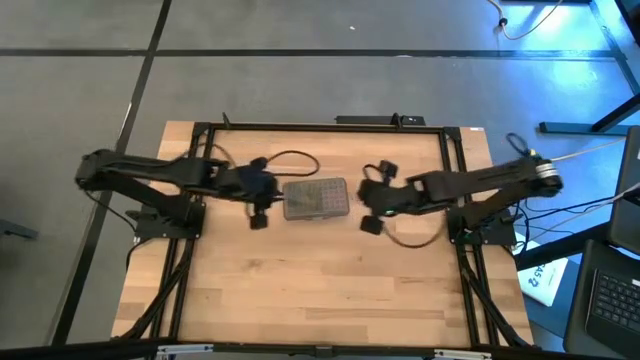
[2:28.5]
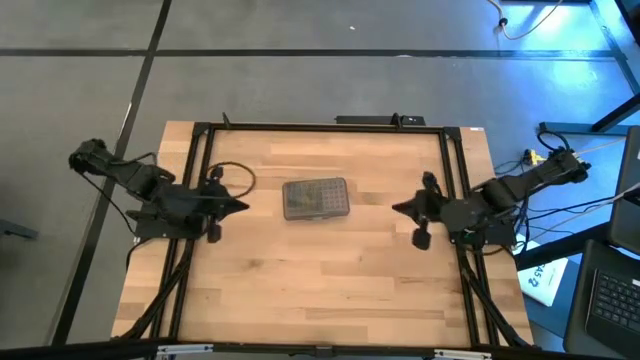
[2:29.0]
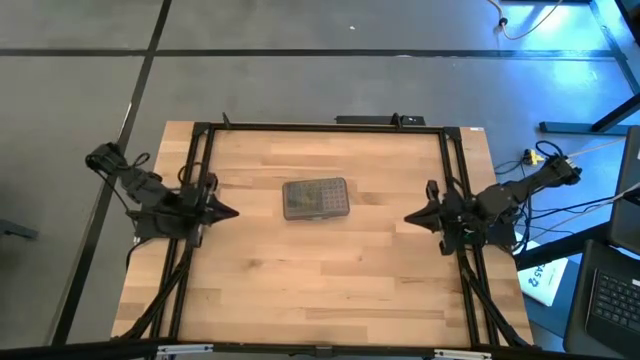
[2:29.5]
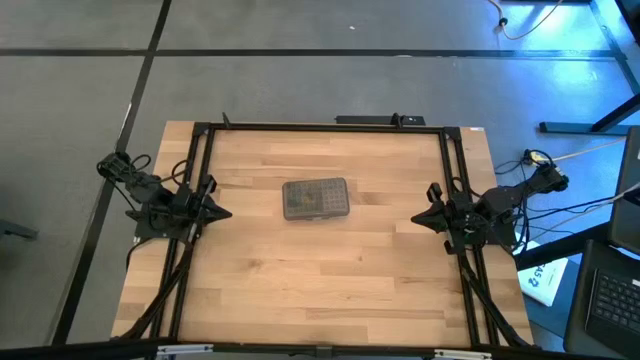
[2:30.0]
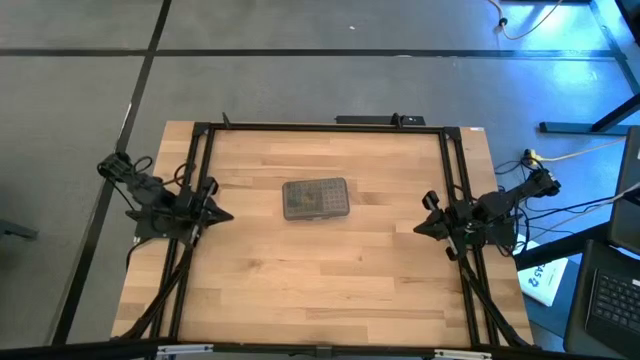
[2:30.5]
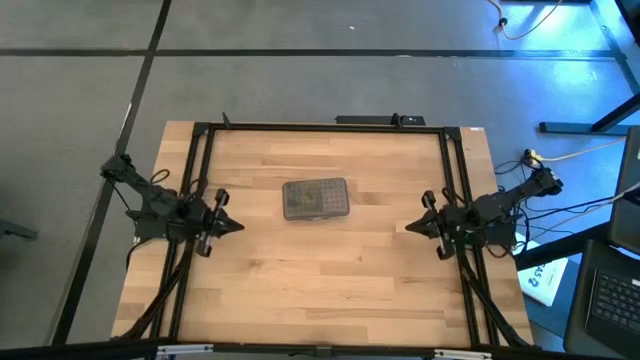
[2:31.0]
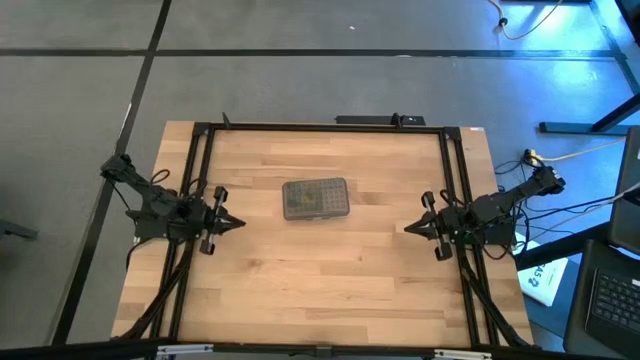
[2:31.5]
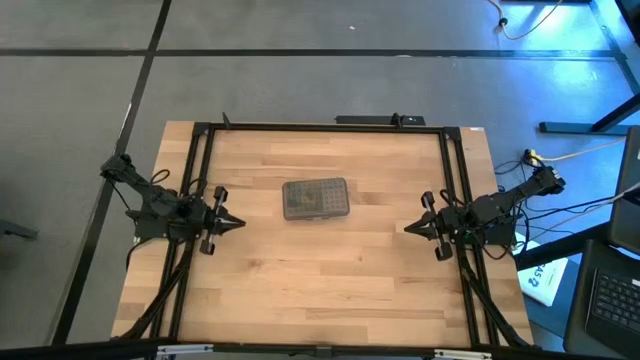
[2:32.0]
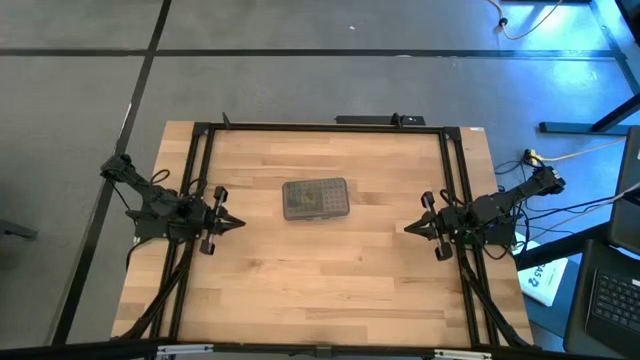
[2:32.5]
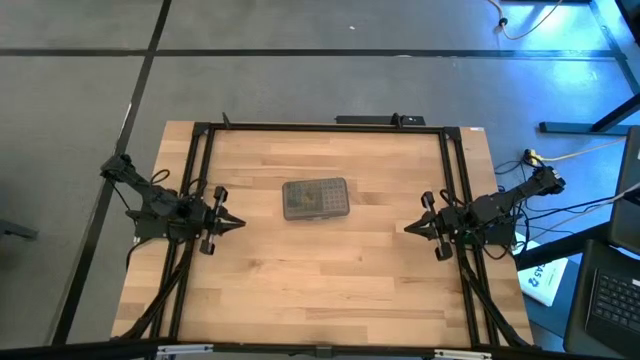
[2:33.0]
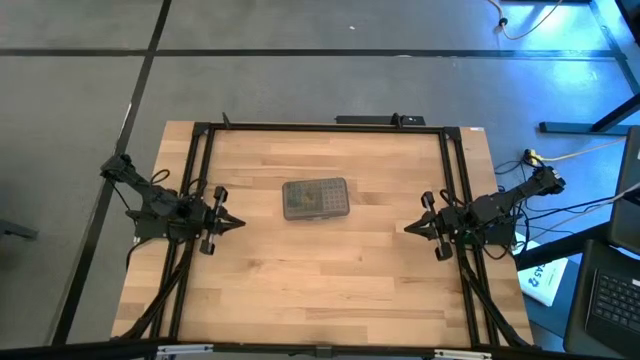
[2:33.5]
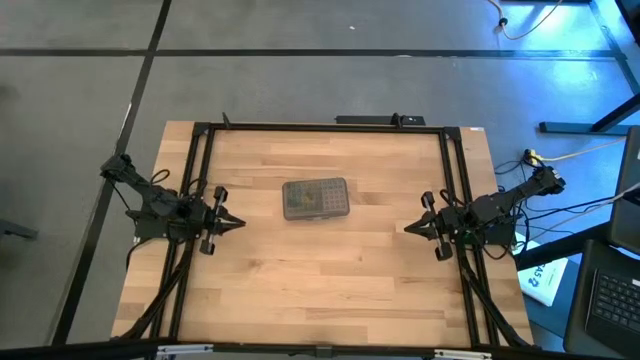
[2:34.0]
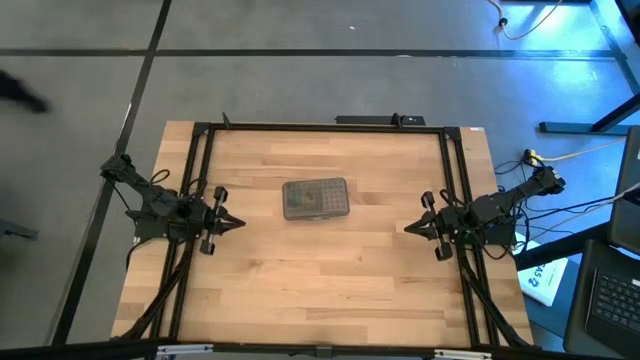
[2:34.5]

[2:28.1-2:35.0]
Task: Pack school essentials
Return to Home Position

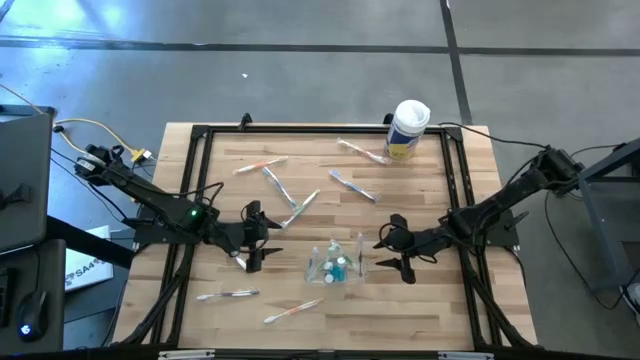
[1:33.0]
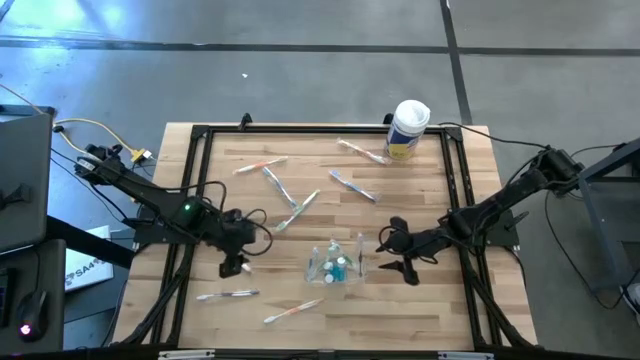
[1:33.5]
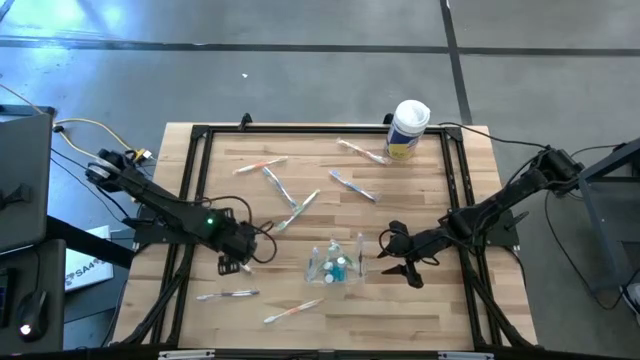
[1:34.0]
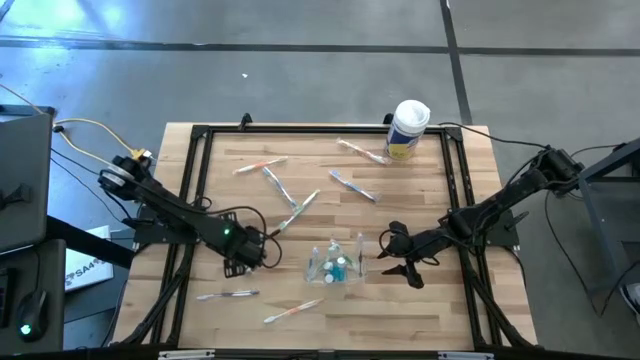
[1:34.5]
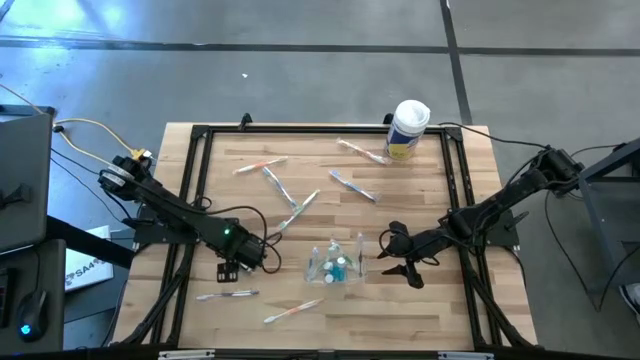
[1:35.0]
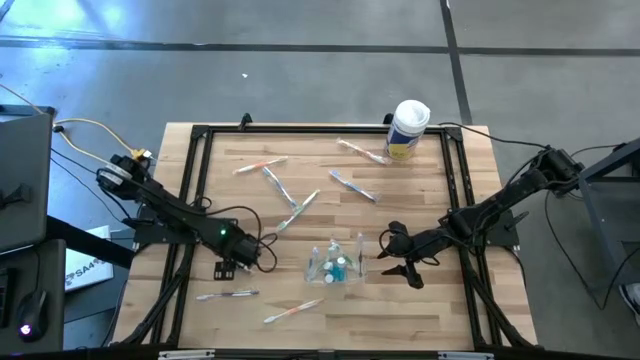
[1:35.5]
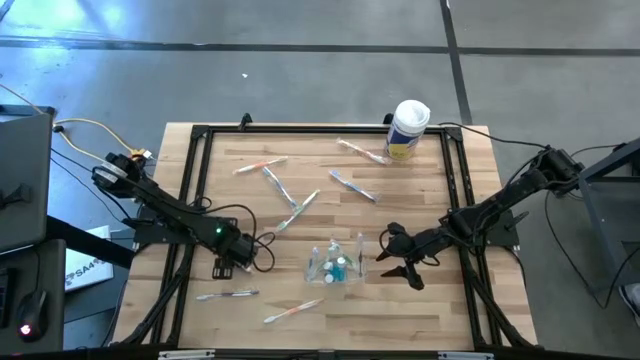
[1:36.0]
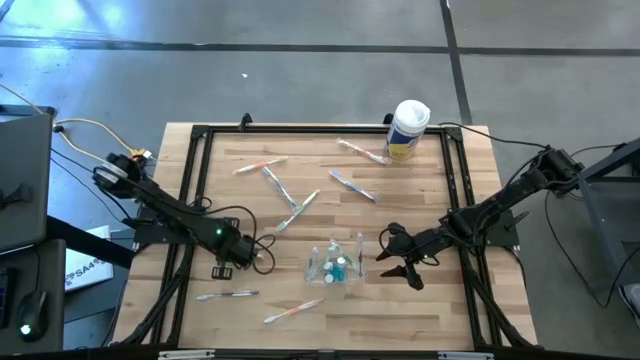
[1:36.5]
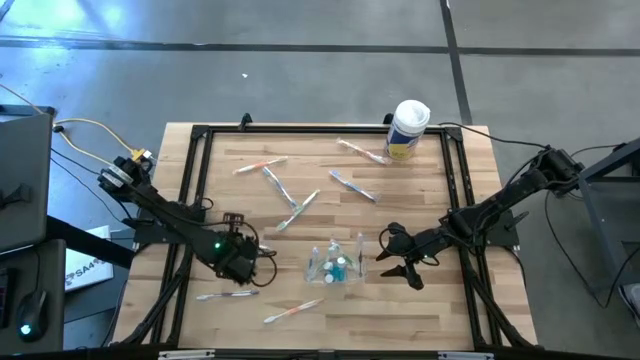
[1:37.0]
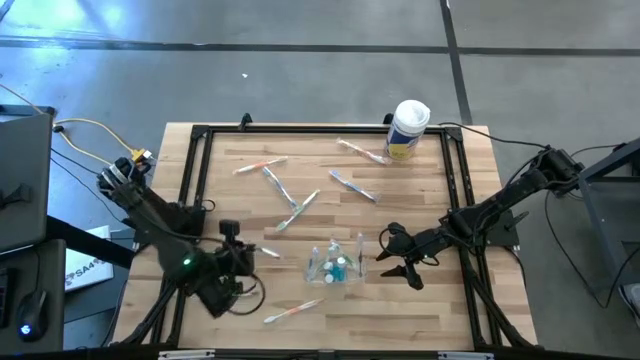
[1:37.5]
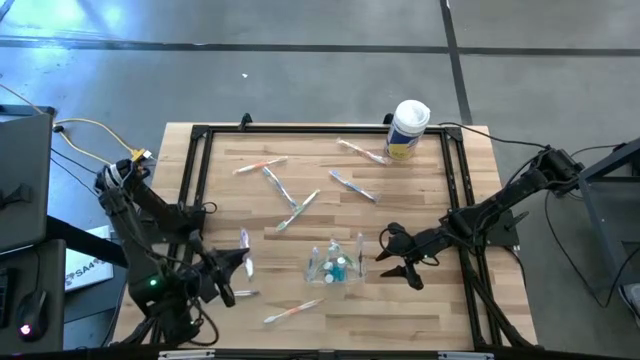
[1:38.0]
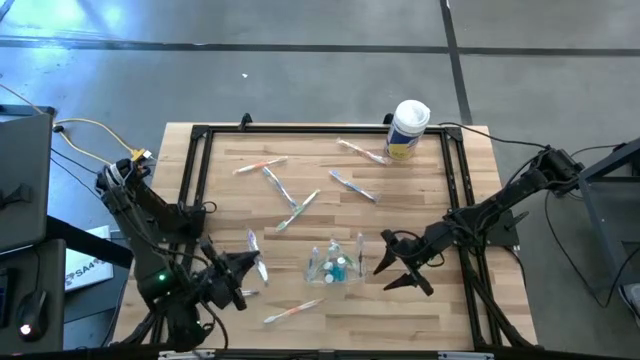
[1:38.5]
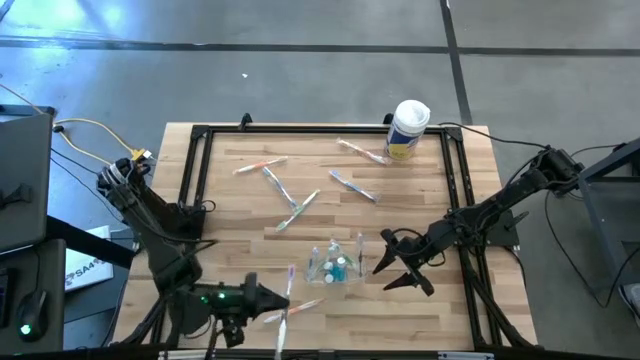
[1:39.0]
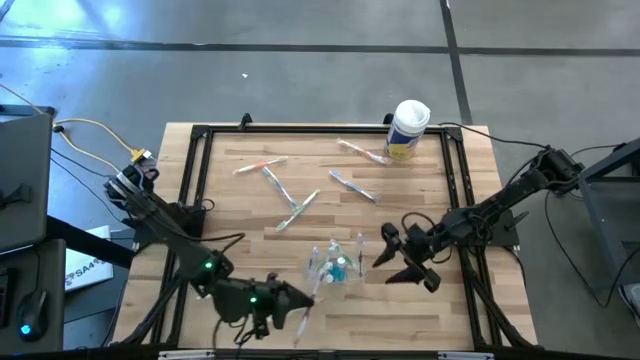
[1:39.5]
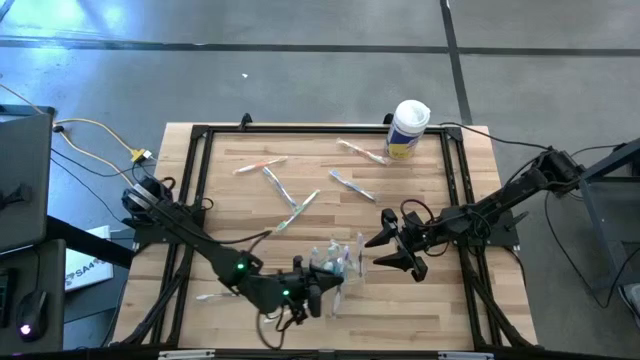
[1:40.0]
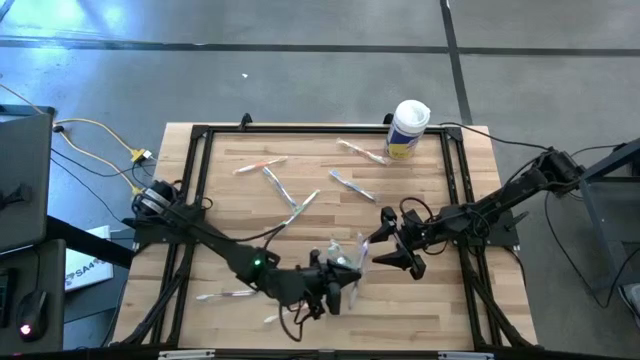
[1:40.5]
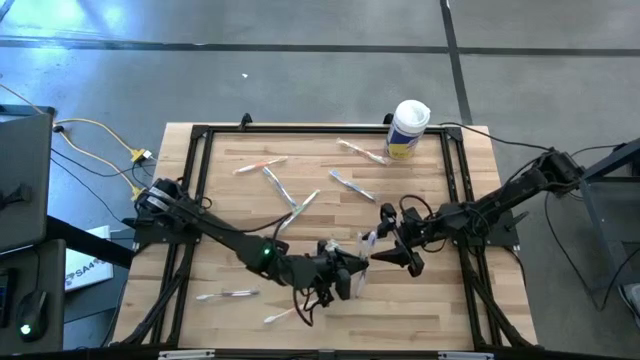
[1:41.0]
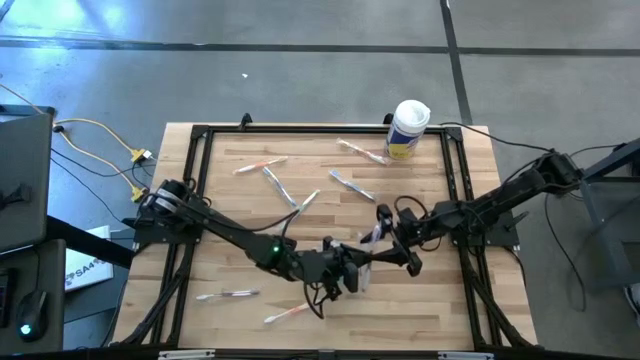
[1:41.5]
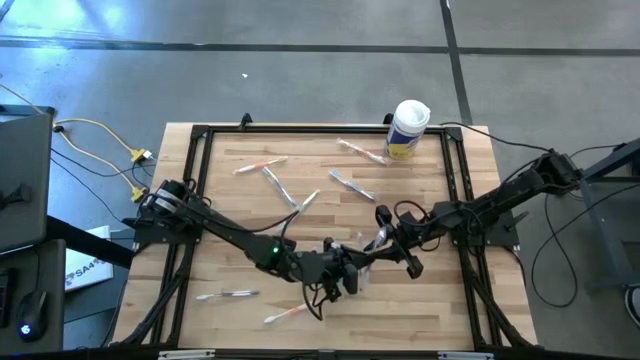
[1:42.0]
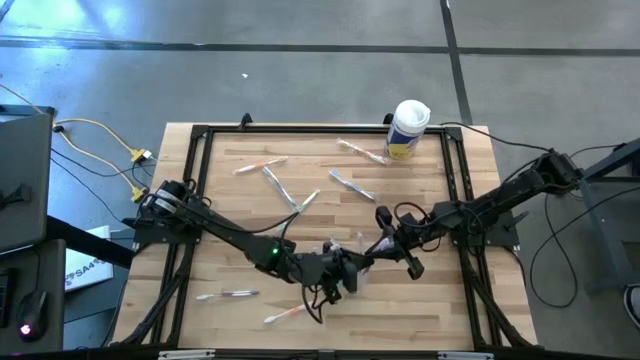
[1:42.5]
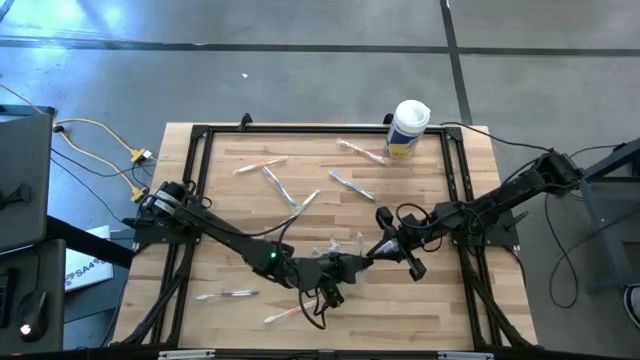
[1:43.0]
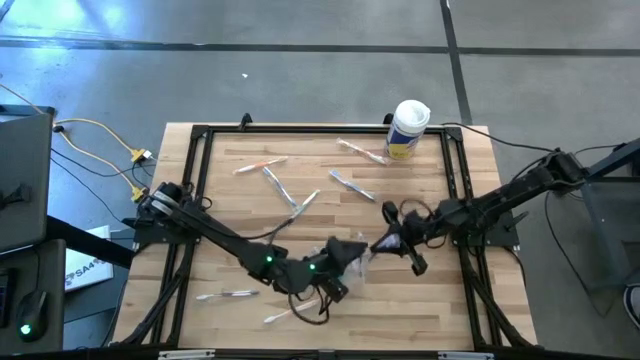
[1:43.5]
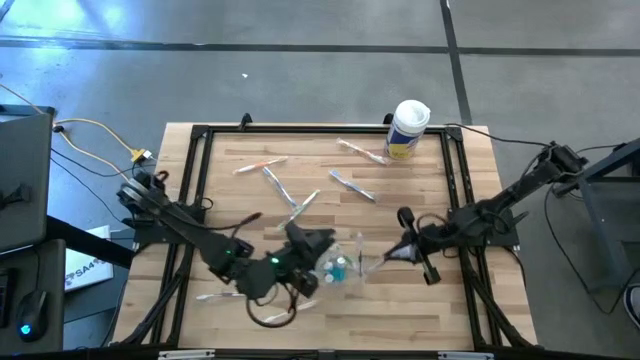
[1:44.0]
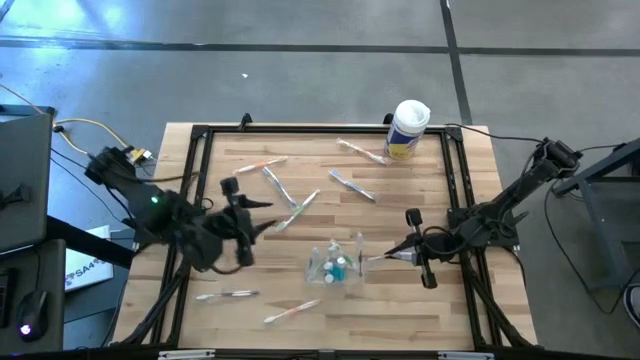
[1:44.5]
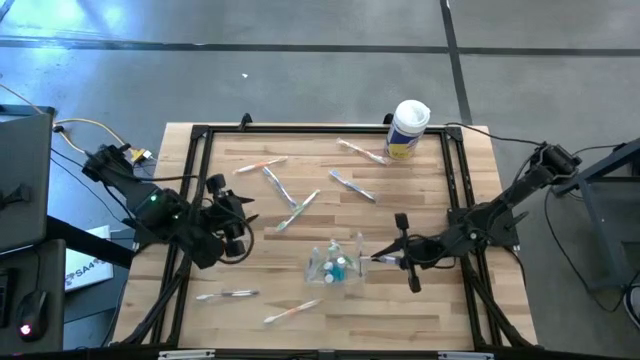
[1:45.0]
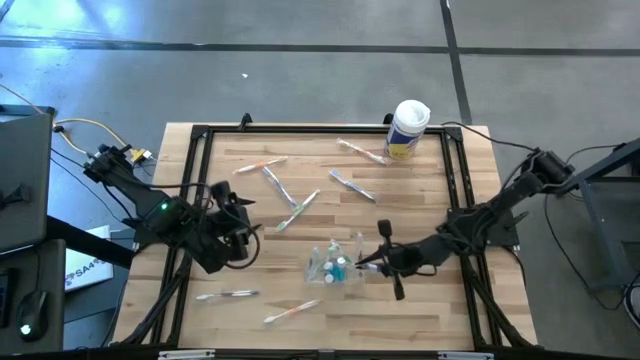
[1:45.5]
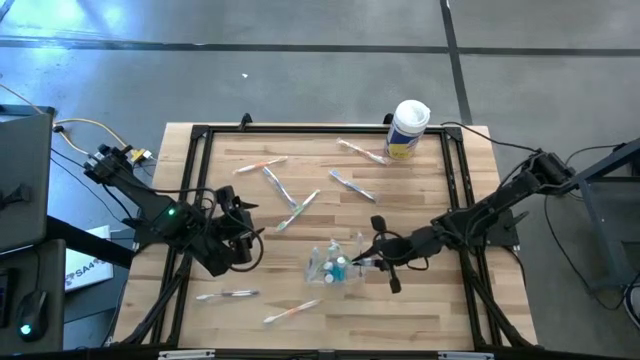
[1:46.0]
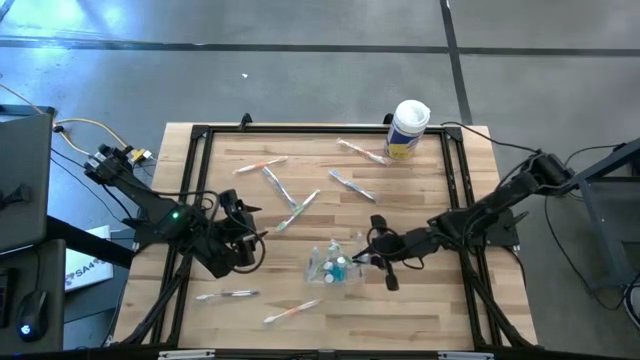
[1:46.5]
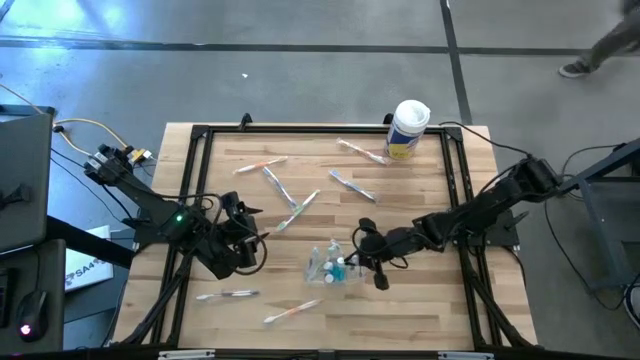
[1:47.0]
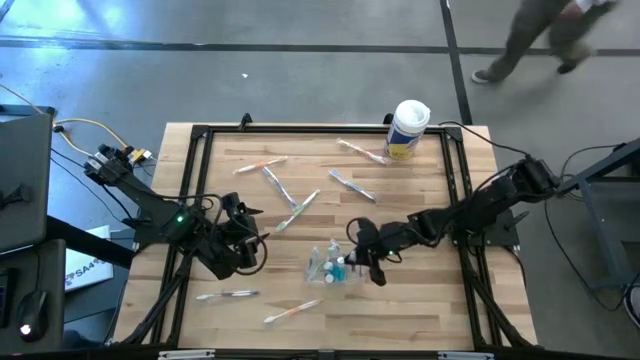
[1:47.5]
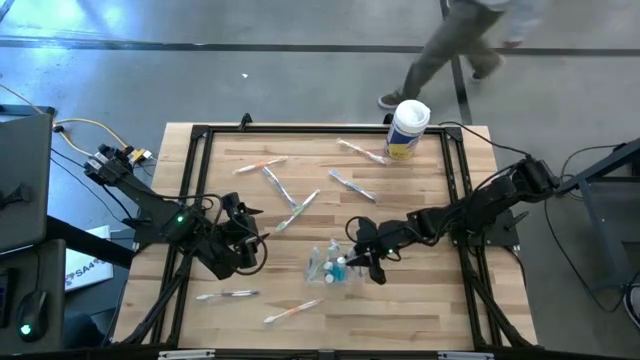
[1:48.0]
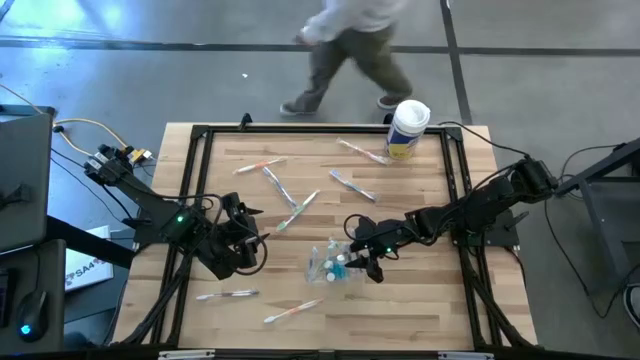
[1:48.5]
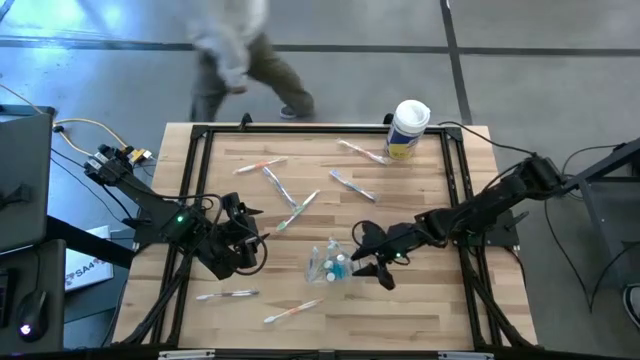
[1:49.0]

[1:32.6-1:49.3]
Task: Pick & Place toothbrushing station
Put the top purple toothbrush into the transparent organizer
